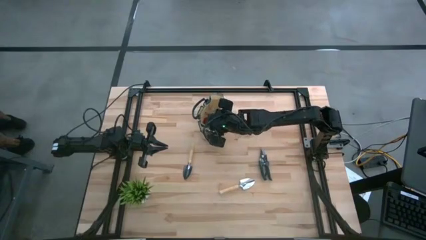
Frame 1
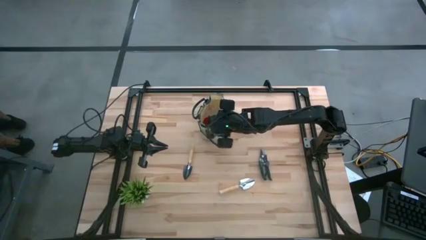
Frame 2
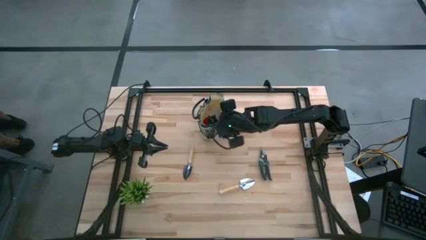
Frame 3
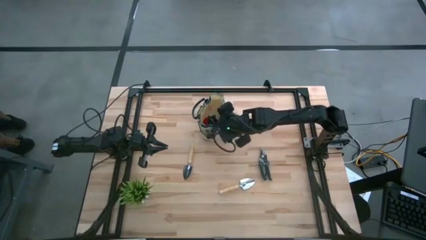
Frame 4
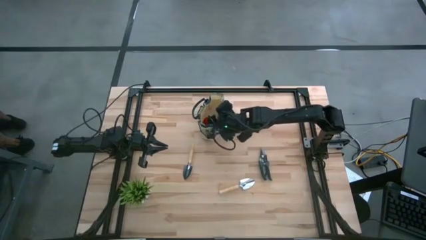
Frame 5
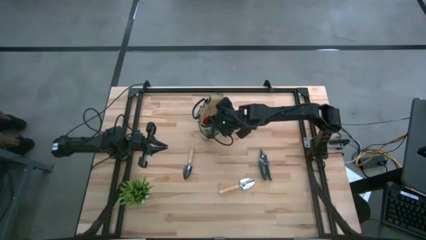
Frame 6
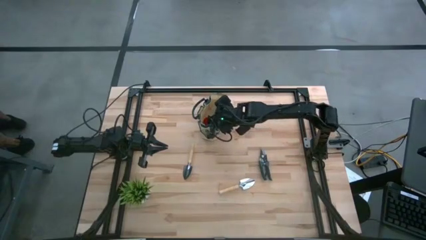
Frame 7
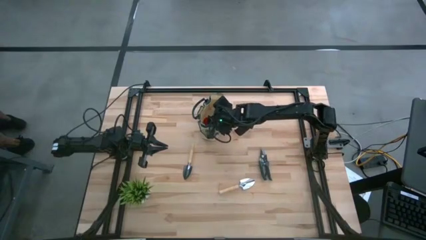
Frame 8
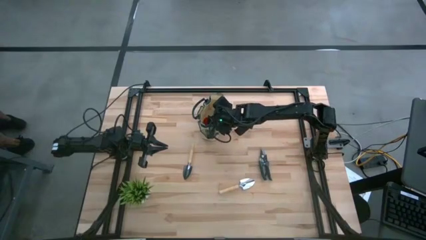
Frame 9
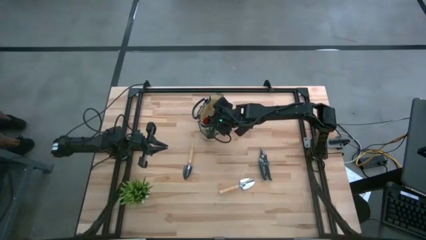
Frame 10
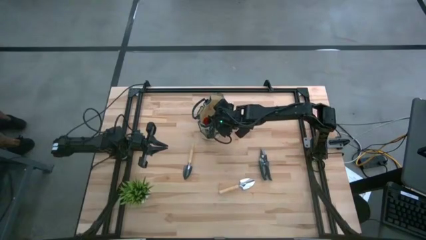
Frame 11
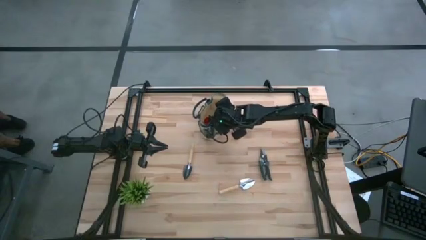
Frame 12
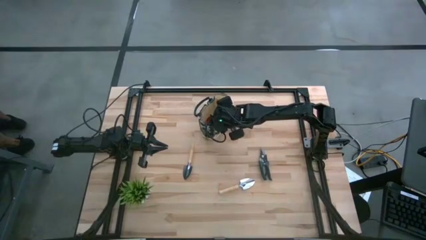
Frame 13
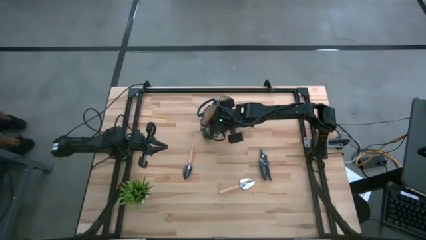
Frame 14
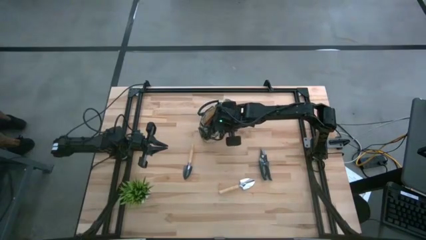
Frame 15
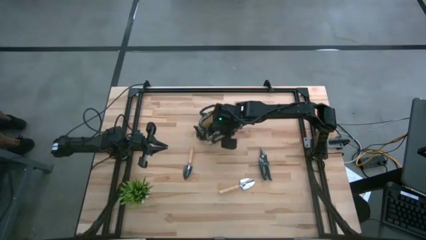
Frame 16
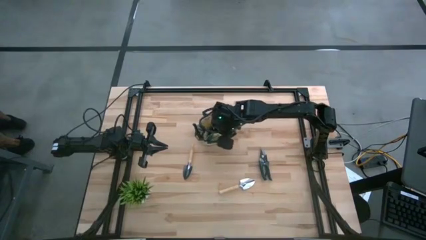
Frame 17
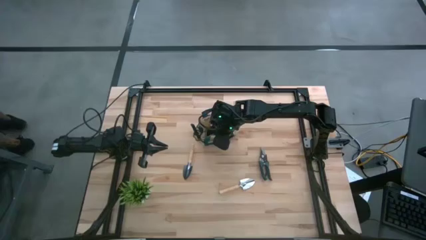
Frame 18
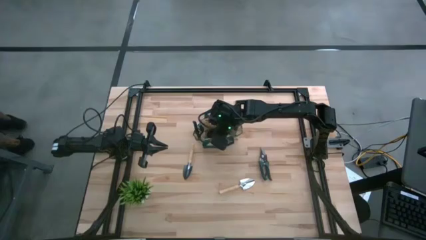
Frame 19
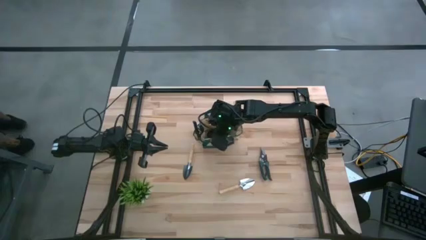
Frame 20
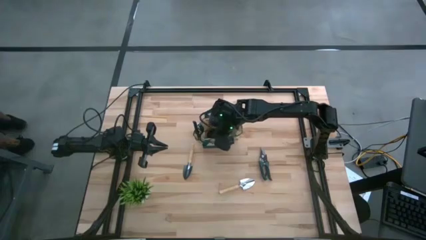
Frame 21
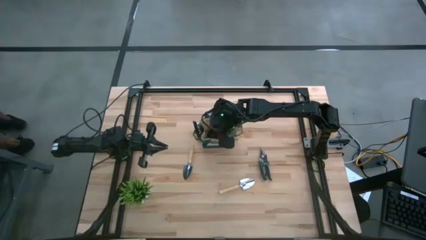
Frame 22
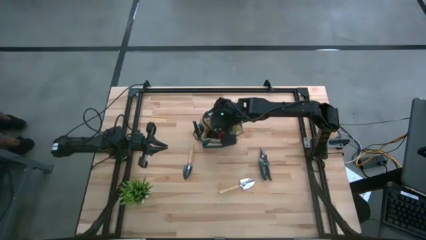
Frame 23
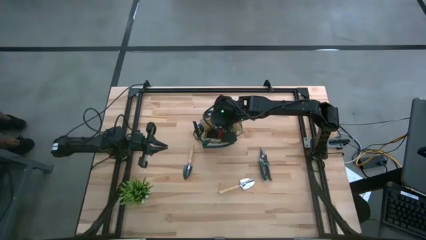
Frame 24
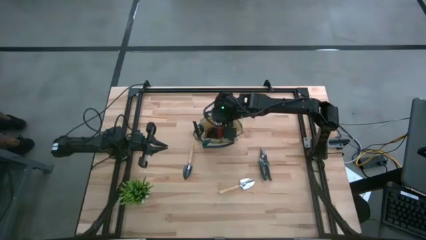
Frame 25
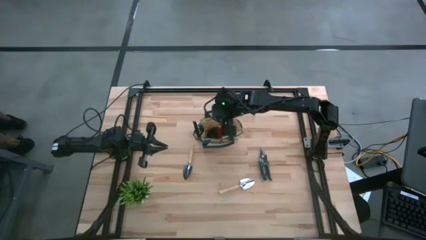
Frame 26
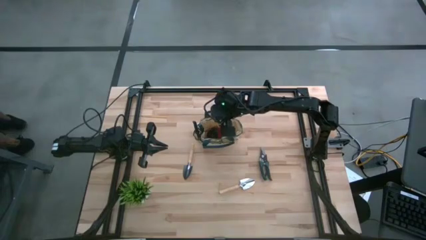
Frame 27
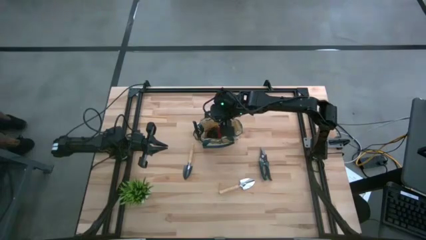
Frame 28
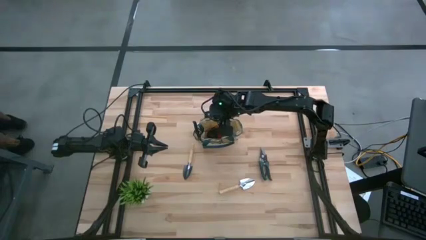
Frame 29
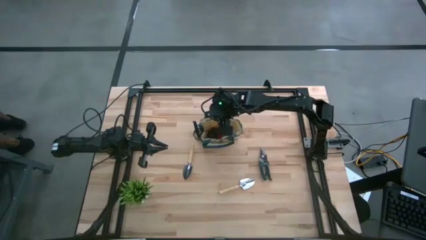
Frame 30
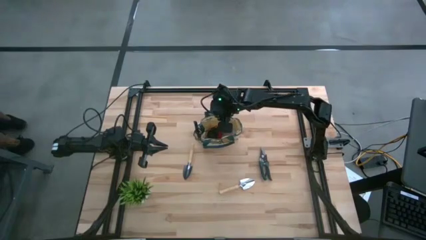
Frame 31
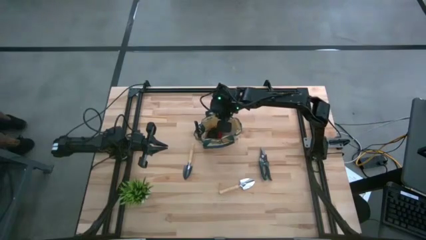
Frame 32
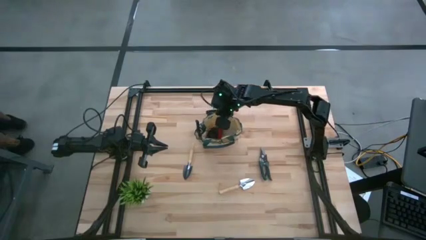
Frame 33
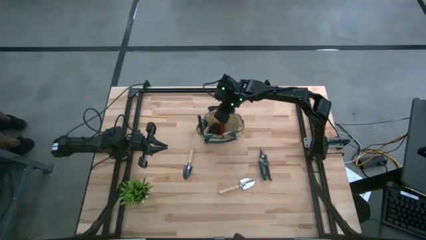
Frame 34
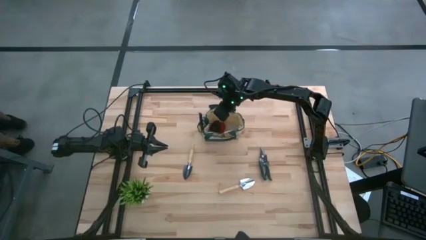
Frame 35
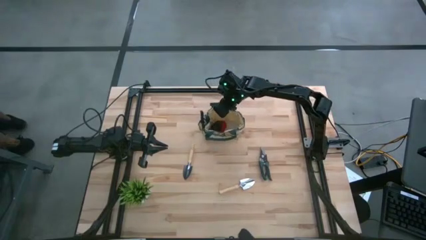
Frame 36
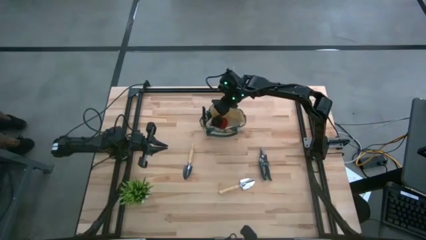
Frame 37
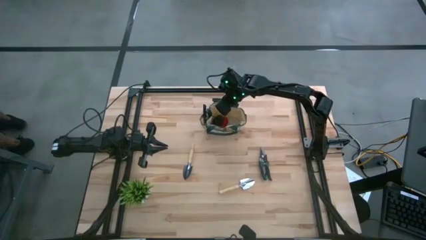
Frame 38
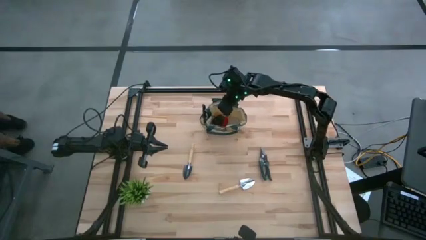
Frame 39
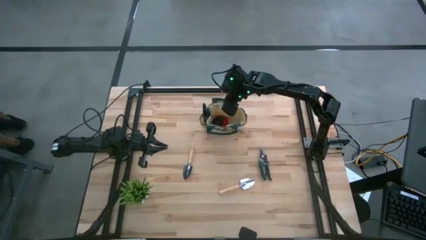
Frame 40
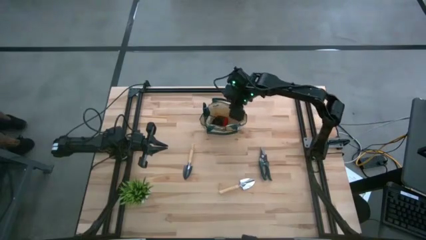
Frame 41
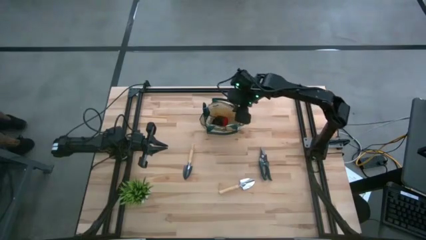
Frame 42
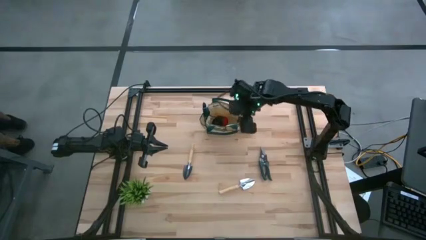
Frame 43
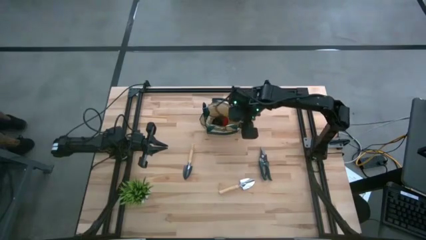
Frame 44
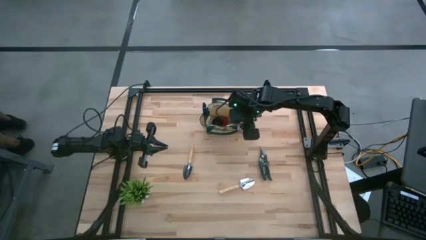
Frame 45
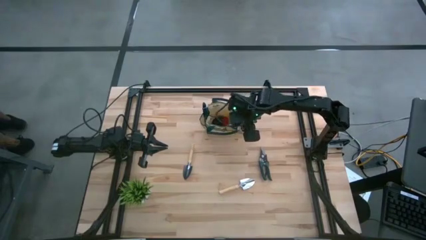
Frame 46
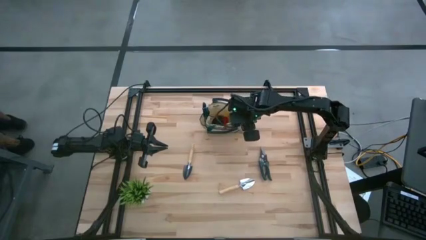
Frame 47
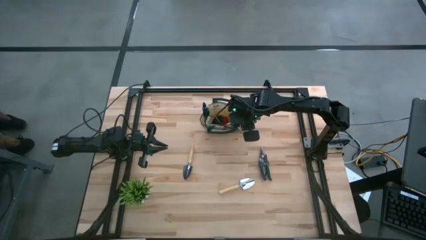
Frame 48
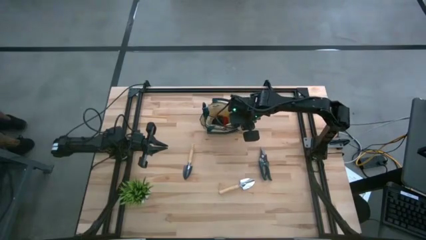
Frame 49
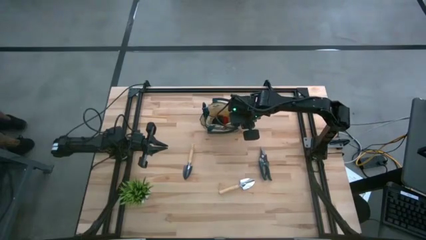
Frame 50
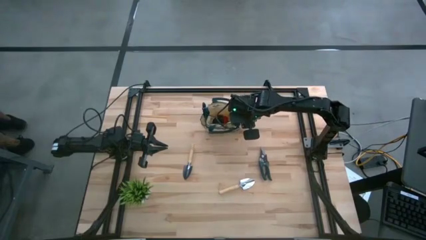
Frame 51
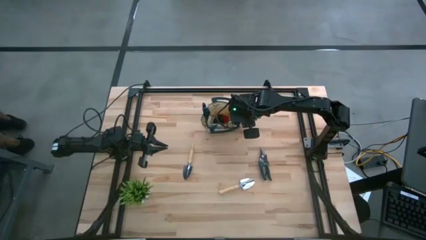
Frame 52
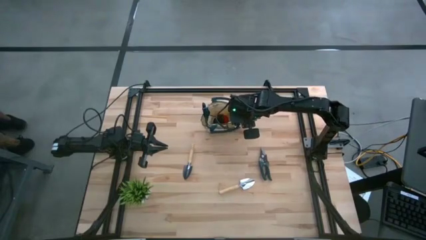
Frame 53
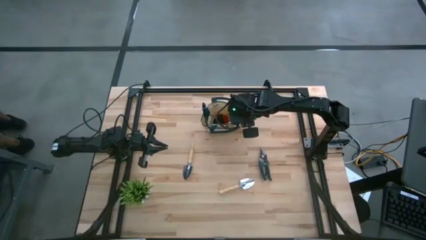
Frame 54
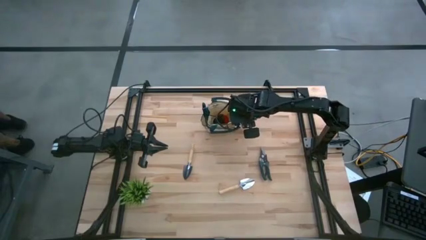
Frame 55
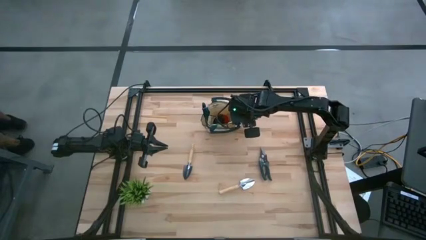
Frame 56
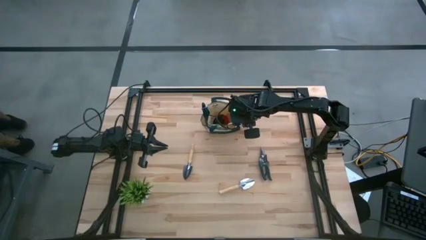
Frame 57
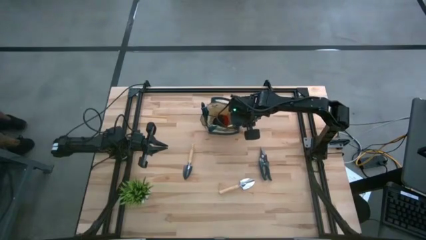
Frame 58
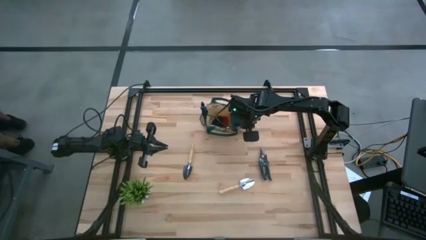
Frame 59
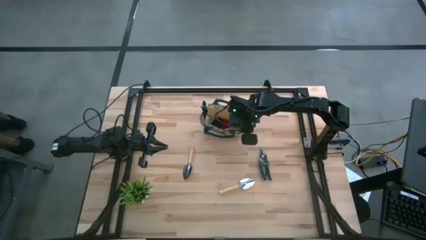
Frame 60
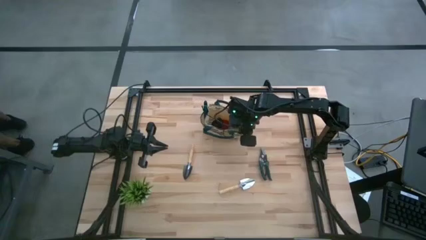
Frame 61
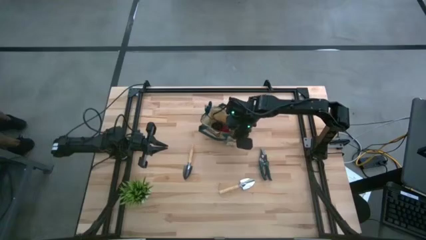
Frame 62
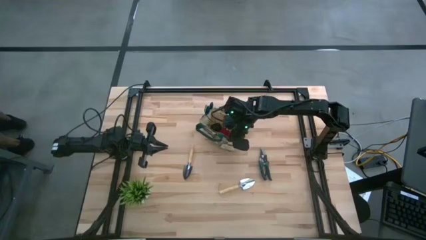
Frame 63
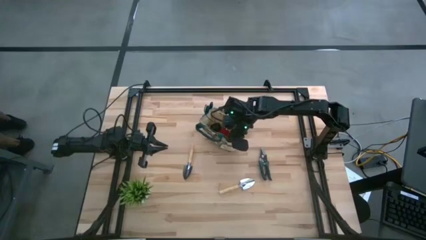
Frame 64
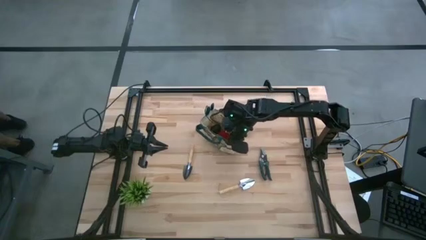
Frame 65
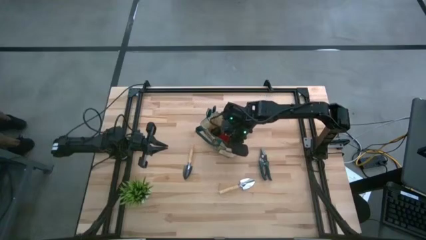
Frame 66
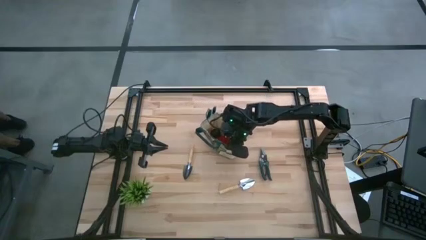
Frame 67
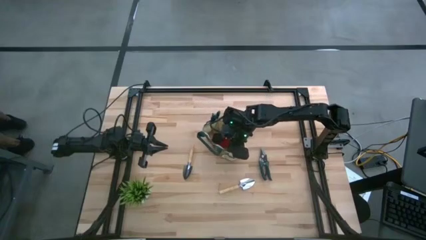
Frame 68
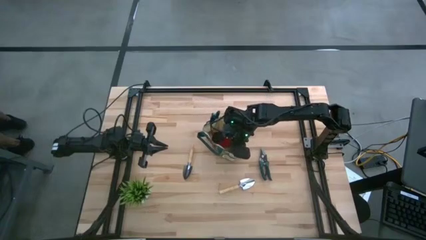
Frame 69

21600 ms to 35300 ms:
Task: Pick & Place Garden tools in Gardening bag
Adjust the gardening bag
